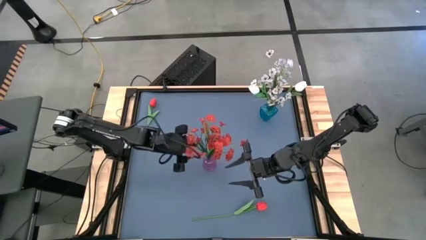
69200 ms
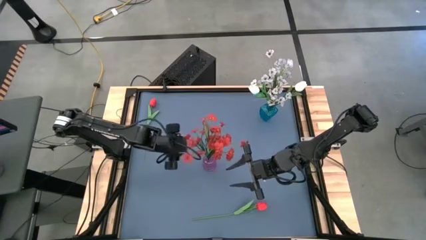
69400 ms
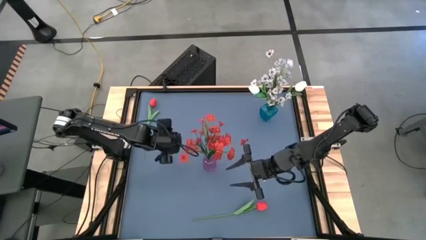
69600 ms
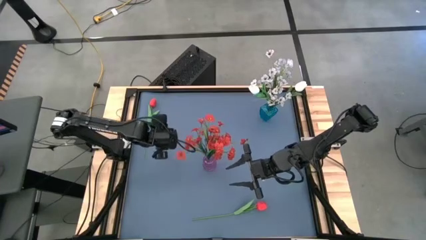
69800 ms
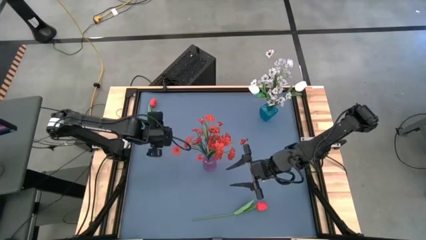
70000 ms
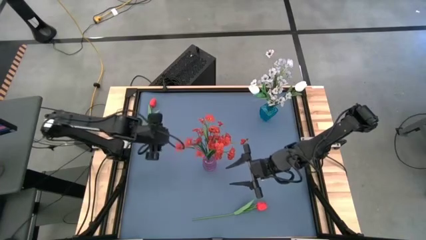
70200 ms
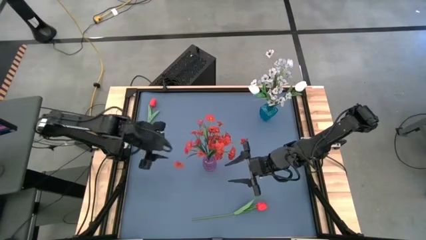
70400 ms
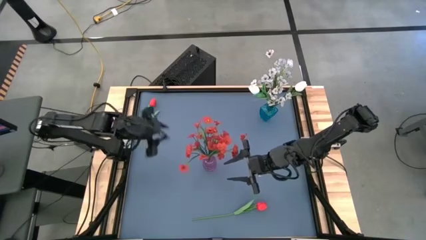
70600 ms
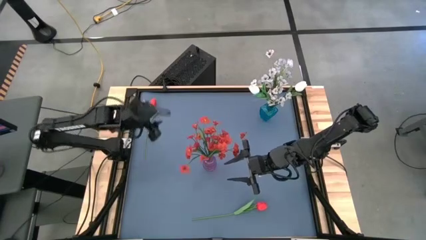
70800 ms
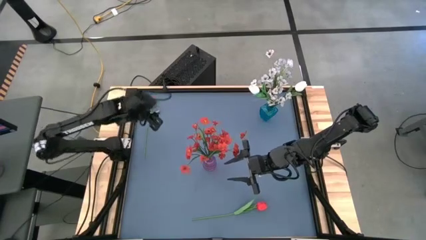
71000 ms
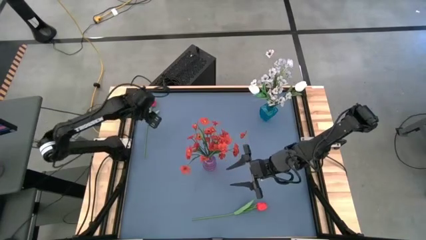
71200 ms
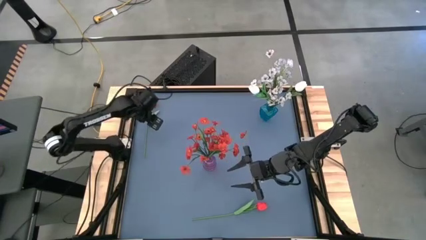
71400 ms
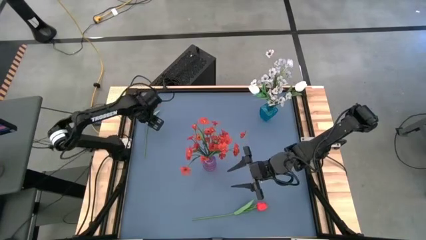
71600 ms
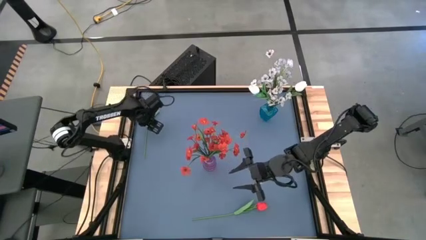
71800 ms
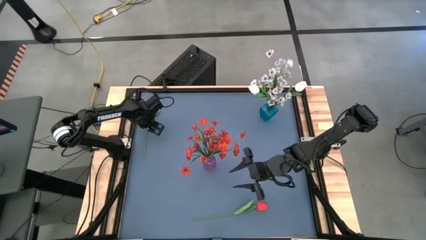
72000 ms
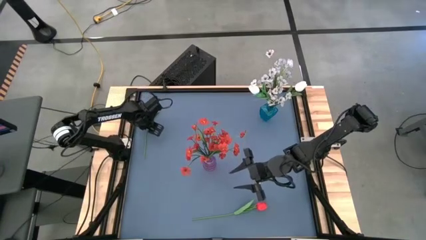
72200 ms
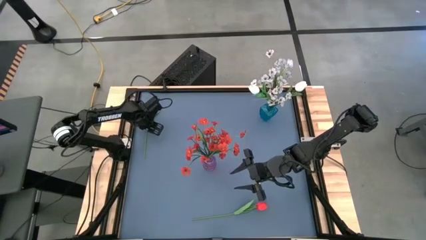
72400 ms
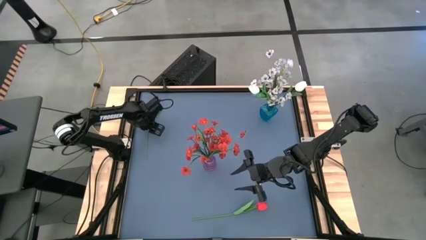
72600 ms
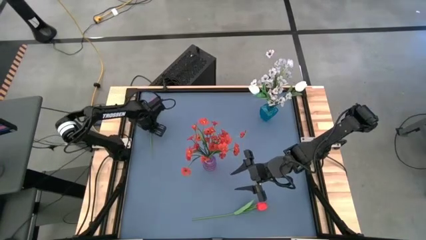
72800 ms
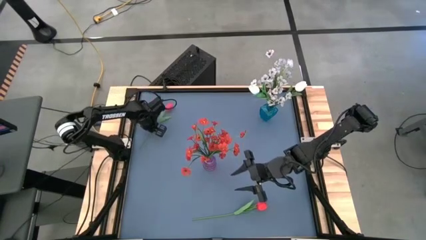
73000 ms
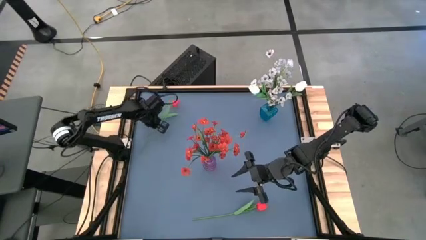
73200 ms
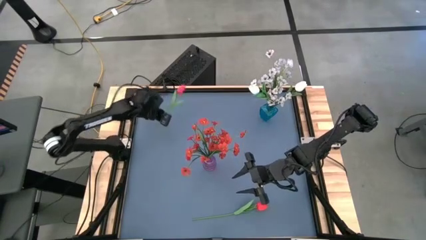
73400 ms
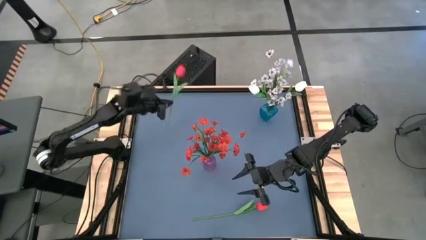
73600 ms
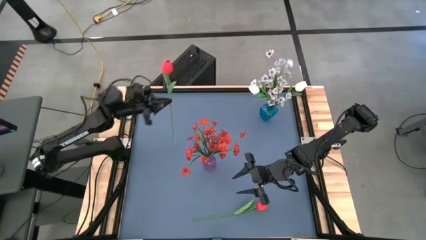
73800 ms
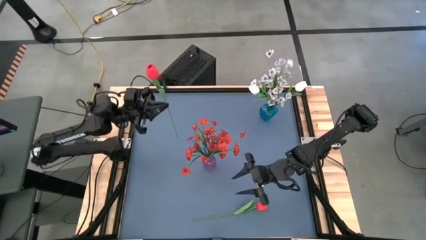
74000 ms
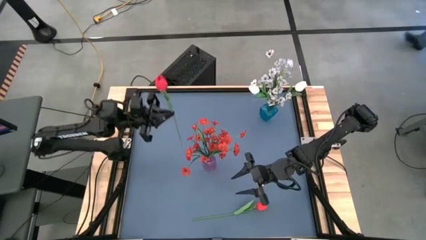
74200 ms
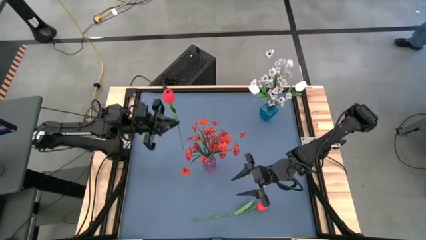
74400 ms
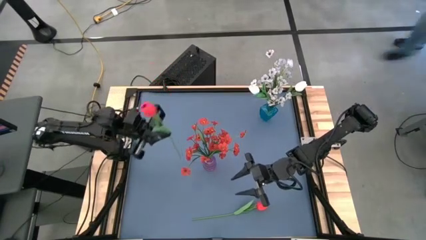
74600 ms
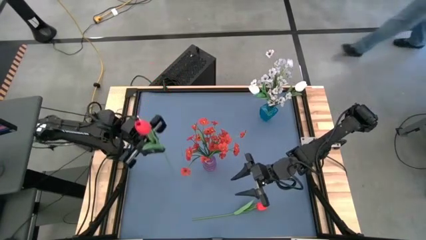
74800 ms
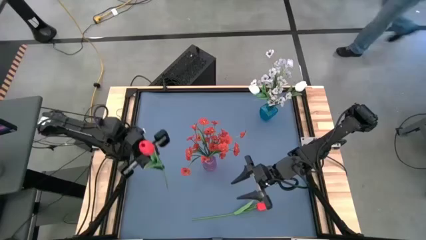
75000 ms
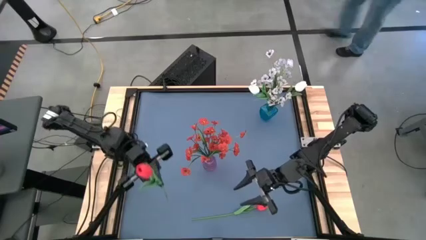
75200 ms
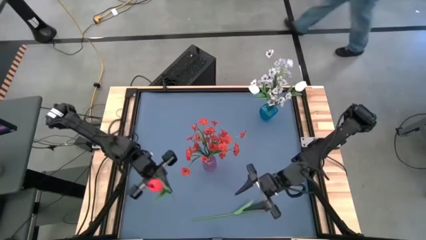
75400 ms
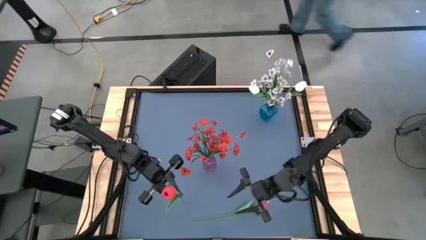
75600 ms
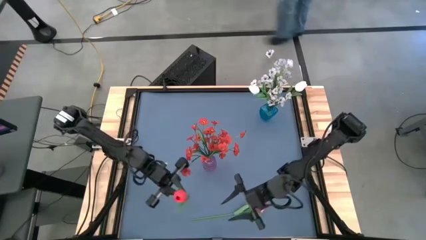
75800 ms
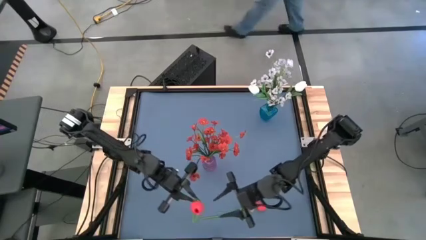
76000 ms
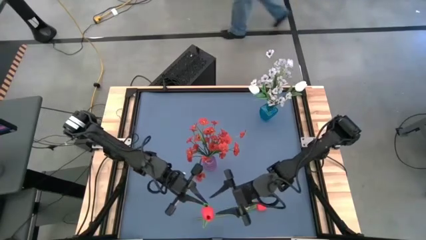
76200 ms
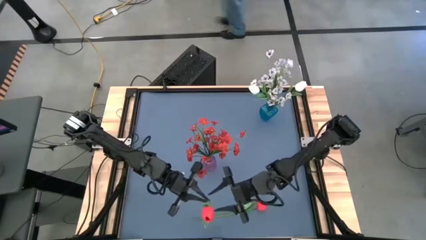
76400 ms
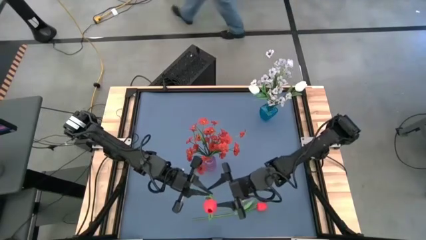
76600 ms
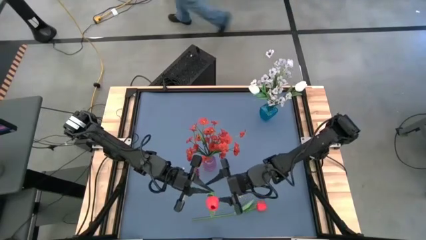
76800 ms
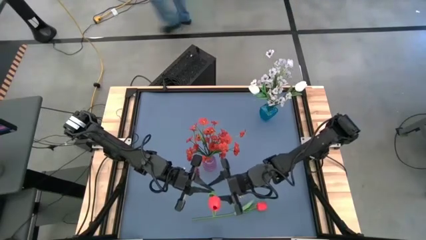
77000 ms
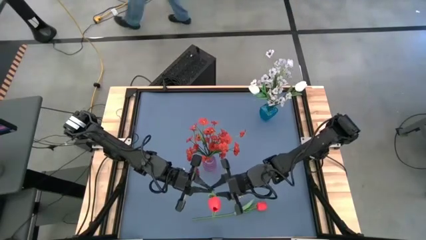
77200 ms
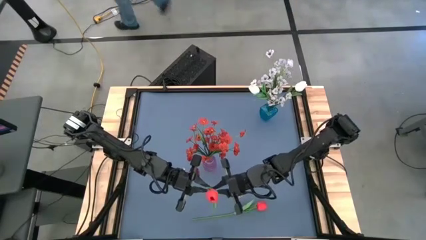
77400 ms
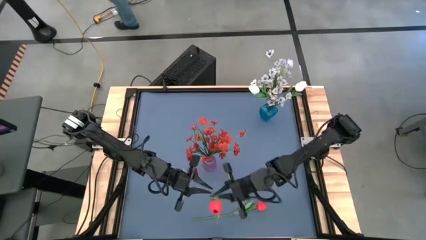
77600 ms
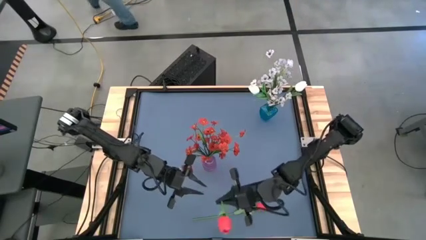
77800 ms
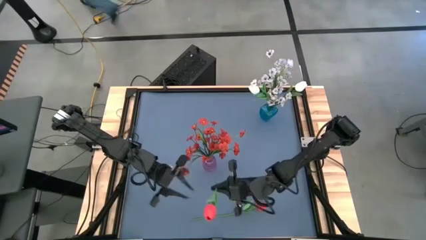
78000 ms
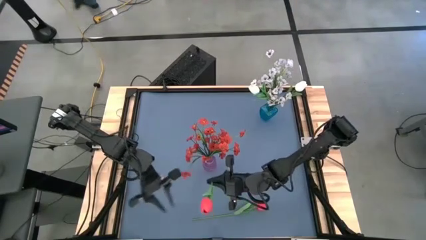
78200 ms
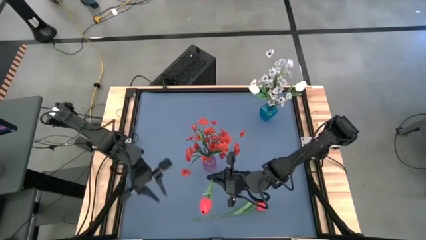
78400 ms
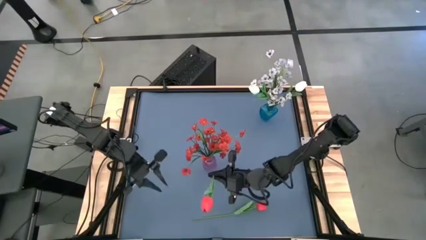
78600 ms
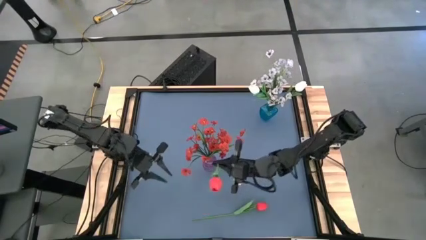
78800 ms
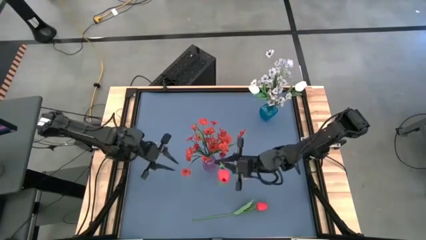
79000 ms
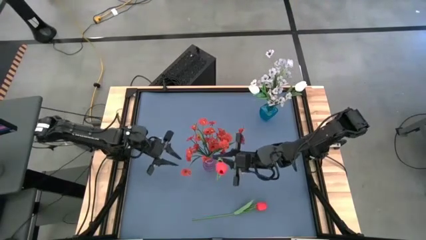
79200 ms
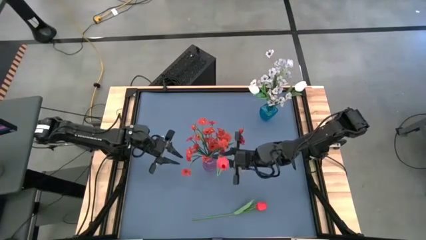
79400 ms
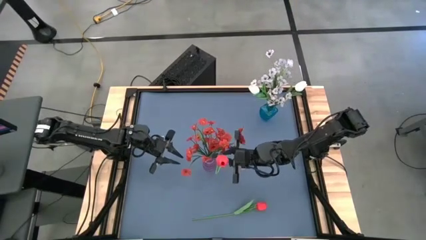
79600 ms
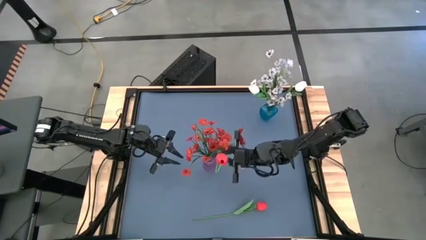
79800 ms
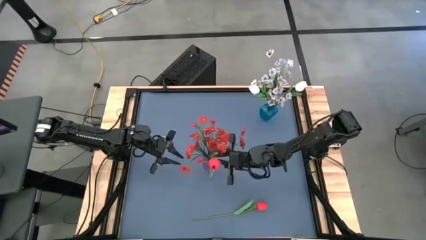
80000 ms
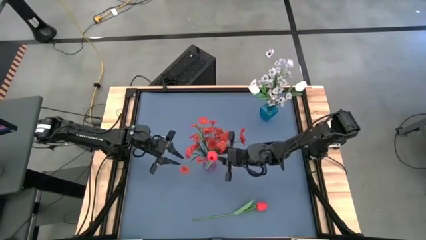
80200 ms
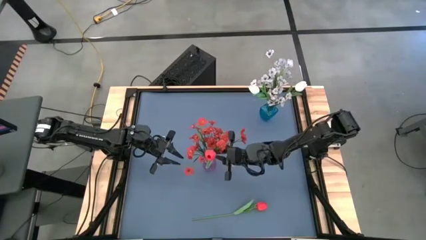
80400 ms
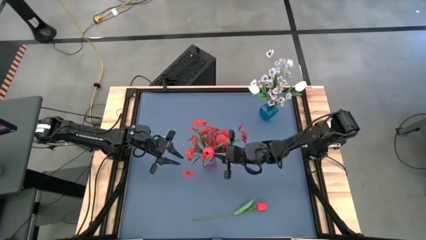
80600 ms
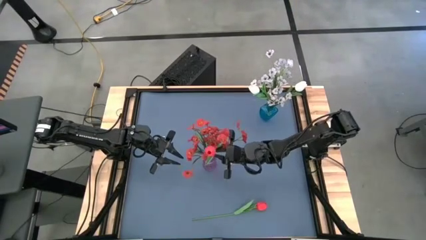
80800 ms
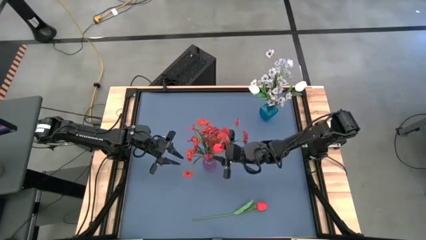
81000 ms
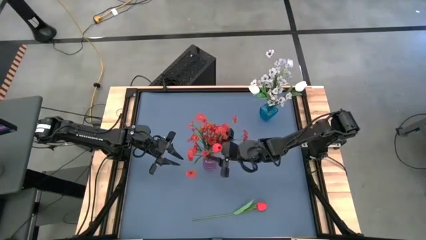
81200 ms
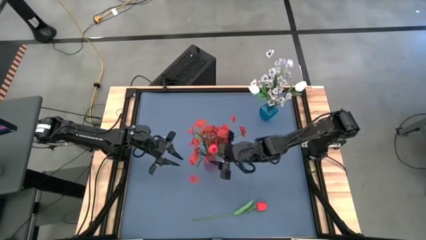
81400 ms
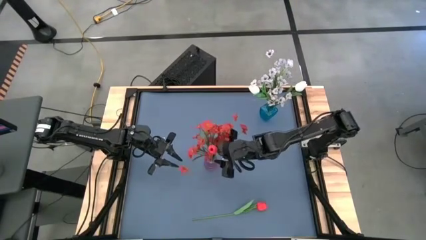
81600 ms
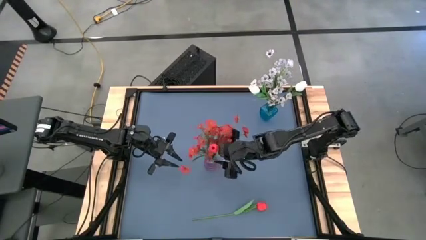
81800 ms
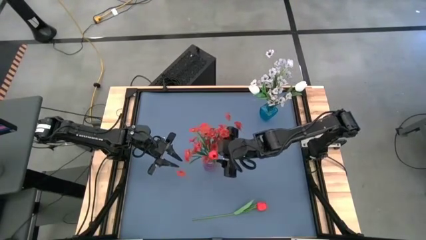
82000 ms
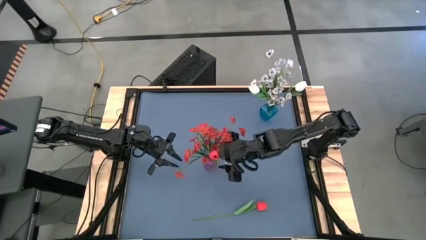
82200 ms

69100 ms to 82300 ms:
Task: Sort flowers into vase by color
Put the top red flower into the purple vase
